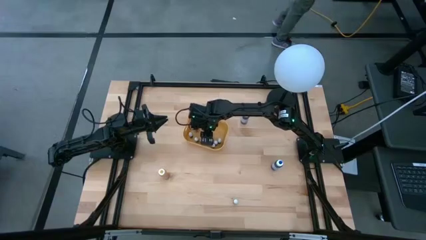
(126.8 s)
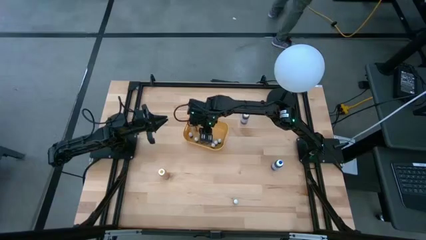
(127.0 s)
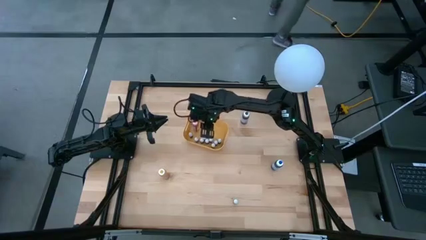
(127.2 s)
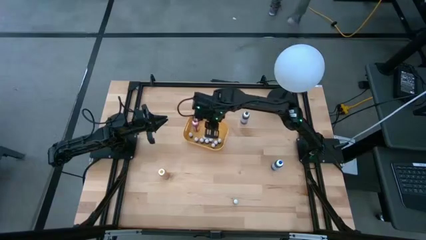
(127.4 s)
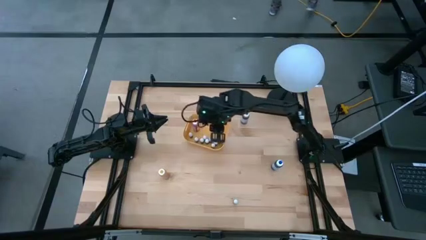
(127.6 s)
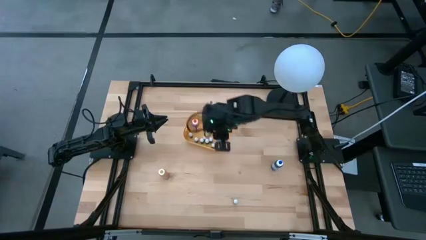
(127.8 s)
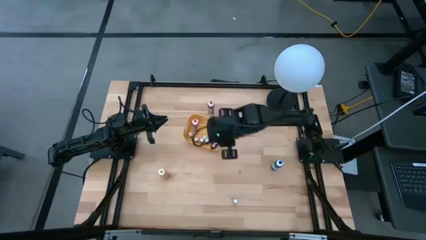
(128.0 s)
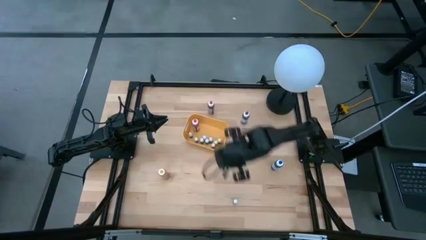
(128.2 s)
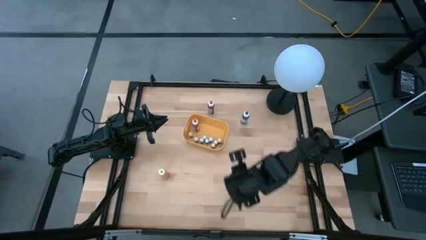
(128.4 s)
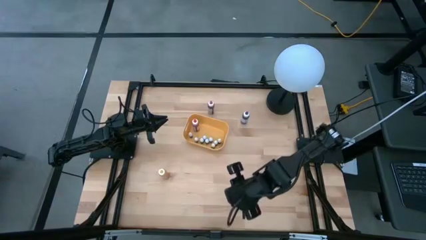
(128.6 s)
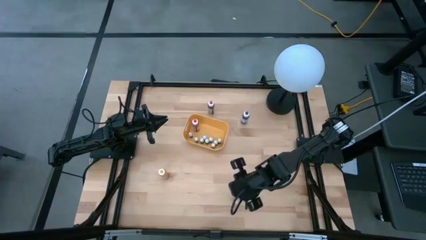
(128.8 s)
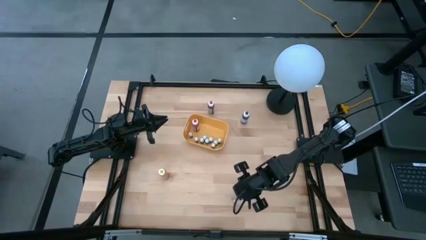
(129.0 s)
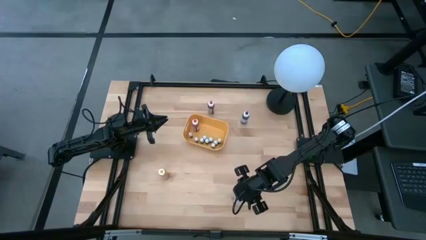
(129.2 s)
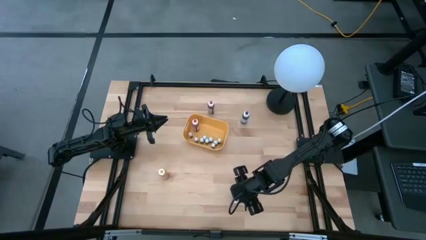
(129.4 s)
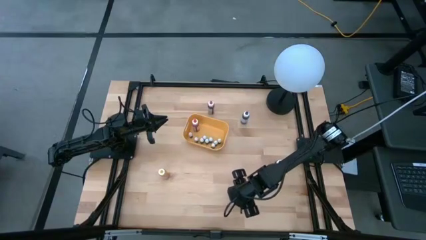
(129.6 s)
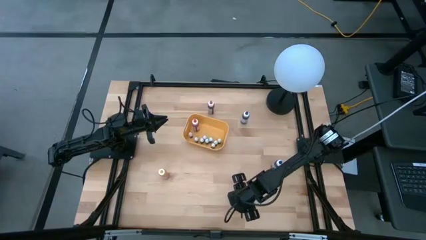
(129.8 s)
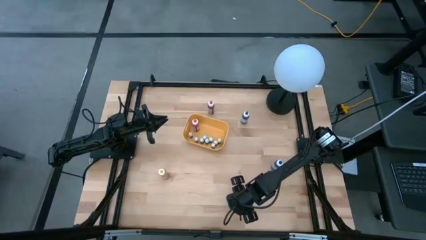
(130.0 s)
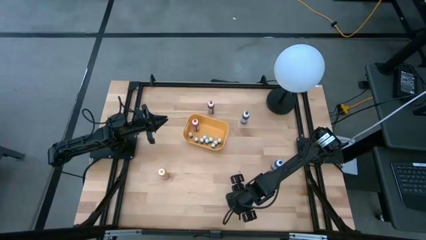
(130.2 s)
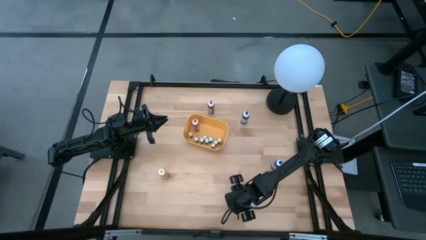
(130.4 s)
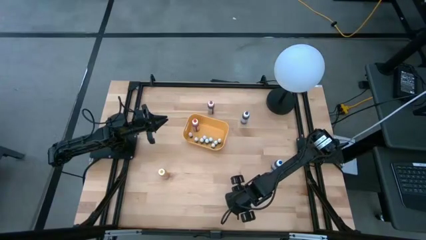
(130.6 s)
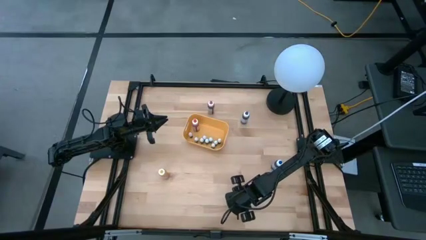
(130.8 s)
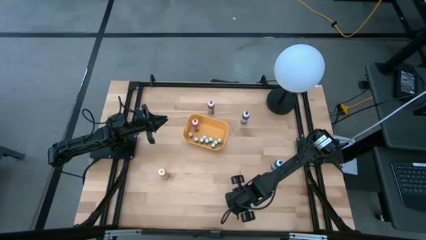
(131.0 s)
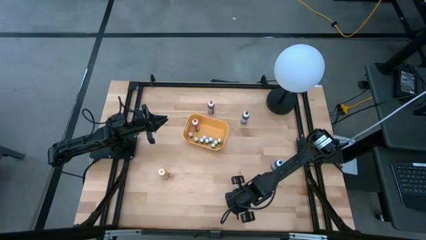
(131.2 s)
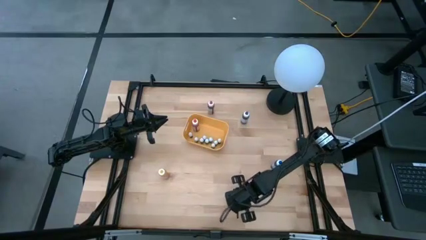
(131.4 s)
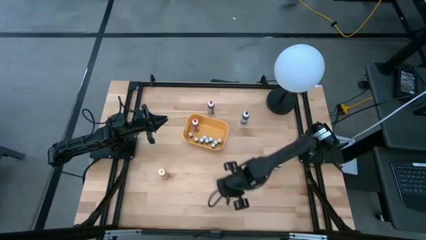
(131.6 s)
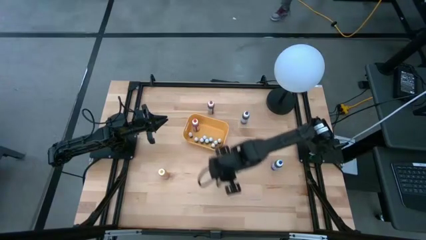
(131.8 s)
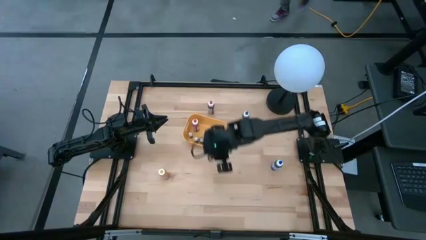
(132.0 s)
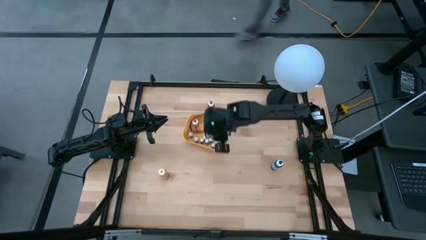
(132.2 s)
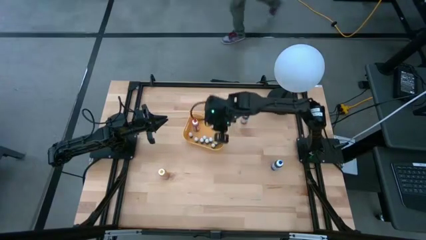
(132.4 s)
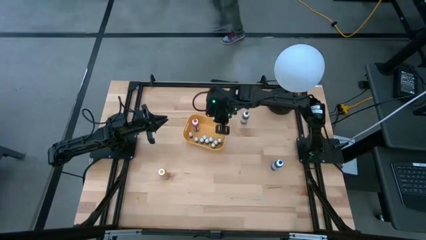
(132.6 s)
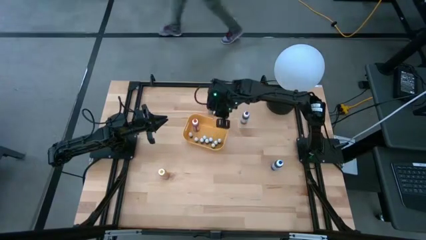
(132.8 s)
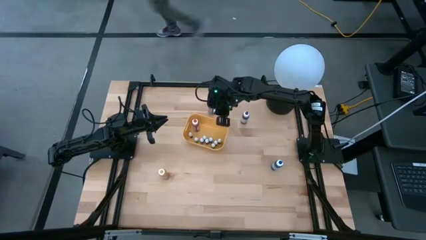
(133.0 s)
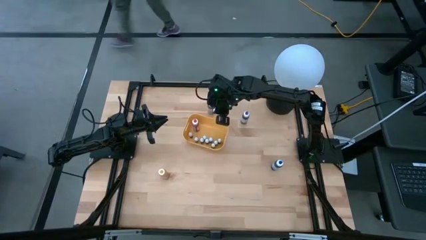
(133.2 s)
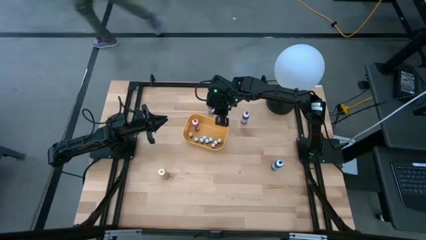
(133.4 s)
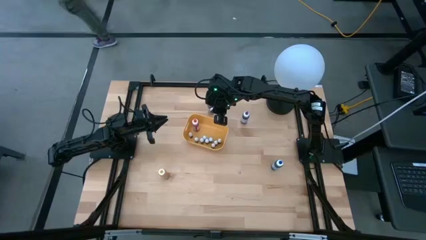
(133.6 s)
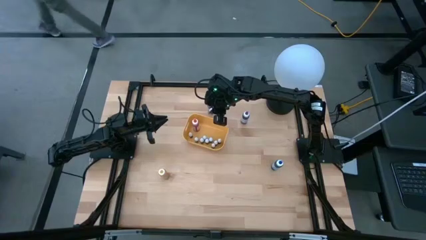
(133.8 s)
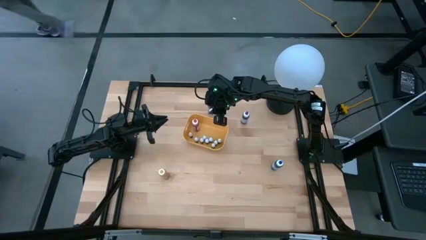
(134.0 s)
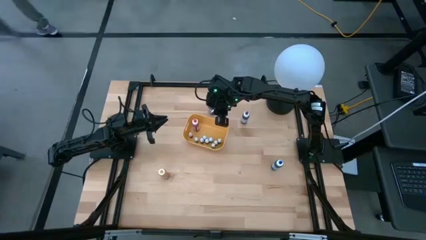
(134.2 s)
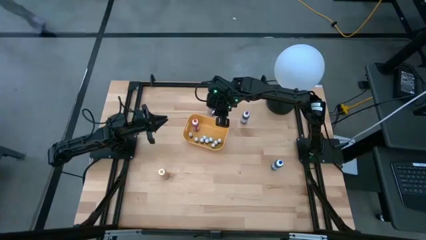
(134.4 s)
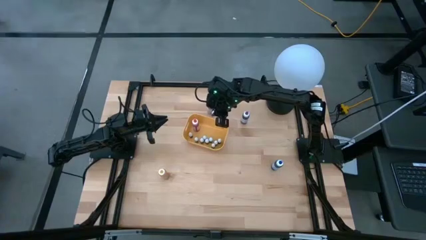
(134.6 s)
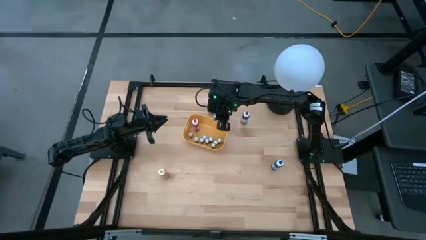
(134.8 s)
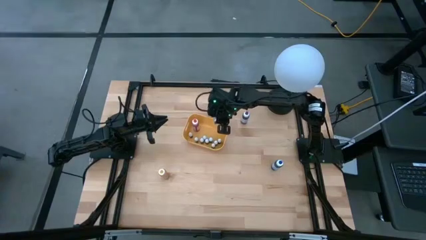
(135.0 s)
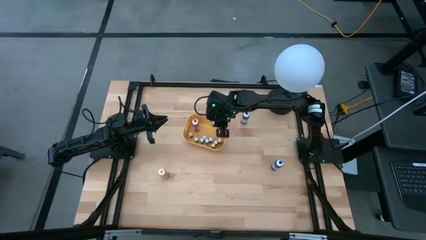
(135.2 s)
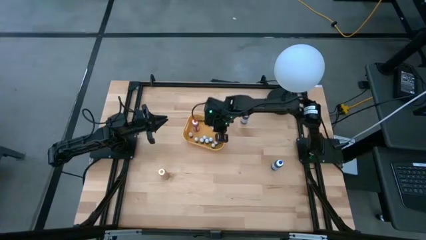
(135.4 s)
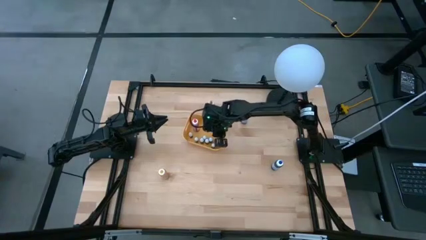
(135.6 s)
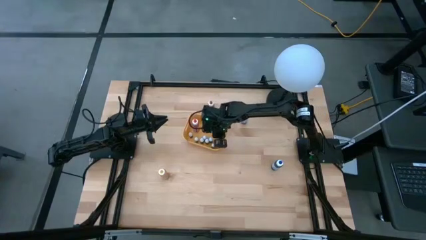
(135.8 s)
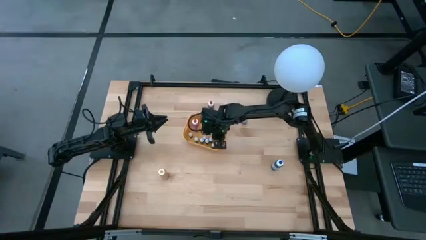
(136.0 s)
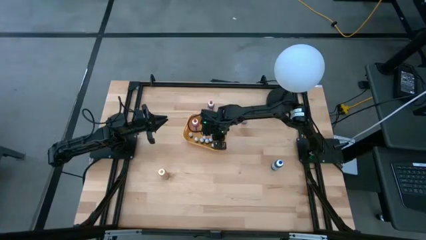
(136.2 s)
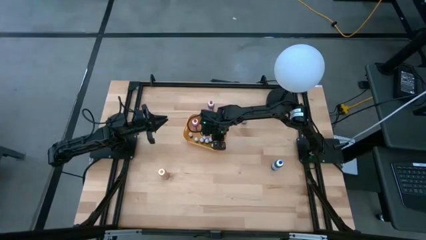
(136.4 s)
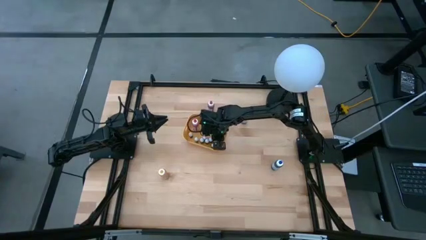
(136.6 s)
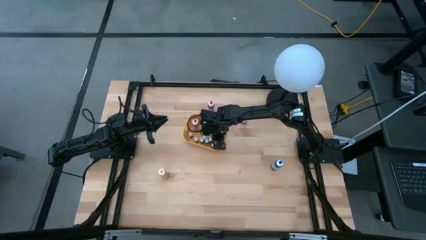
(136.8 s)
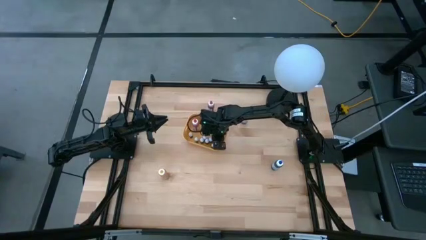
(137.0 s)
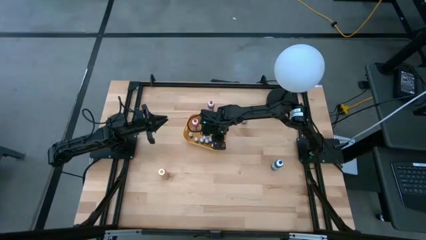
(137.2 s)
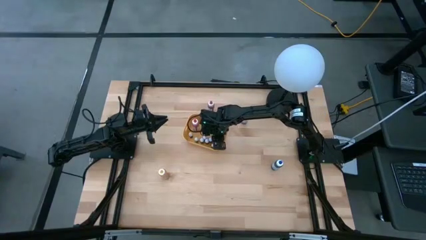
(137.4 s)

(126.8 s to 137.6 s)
Task: Pick & Place food coloring
Put the small pink food coloring bottle into the yellow bin

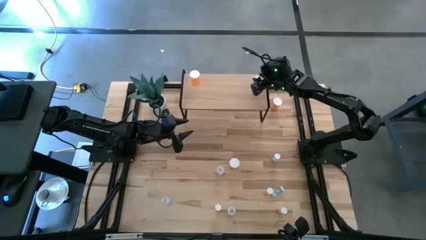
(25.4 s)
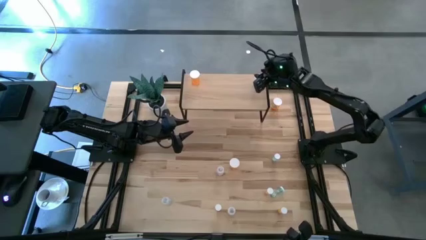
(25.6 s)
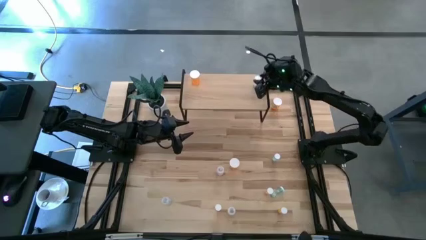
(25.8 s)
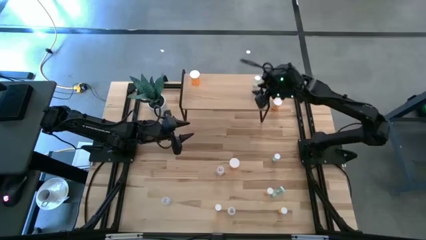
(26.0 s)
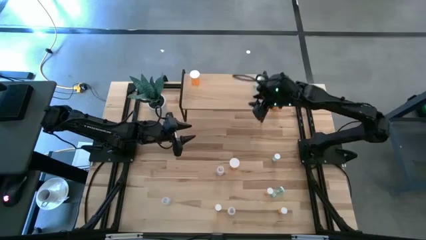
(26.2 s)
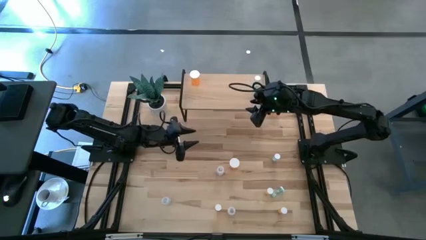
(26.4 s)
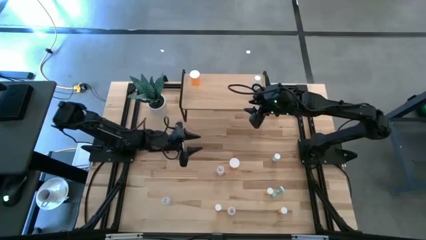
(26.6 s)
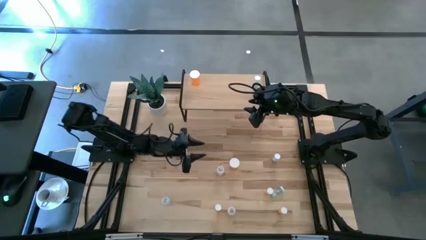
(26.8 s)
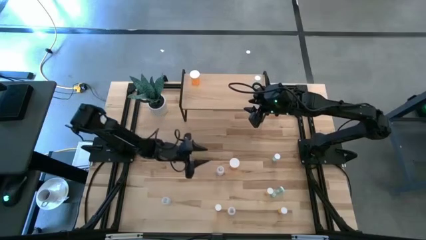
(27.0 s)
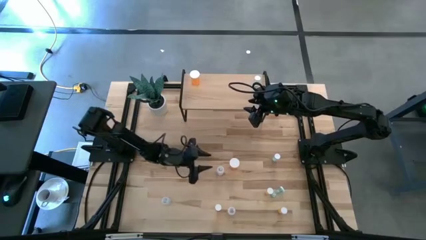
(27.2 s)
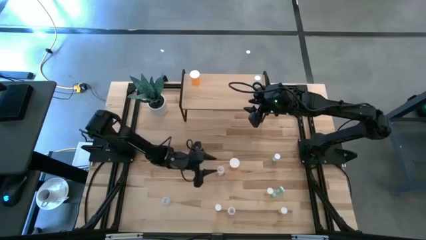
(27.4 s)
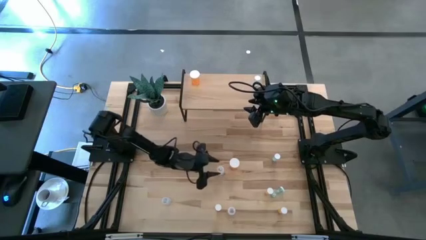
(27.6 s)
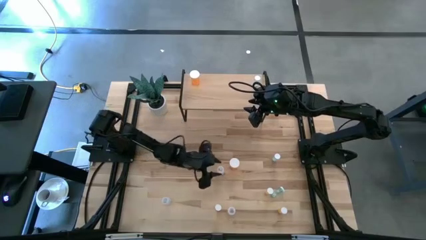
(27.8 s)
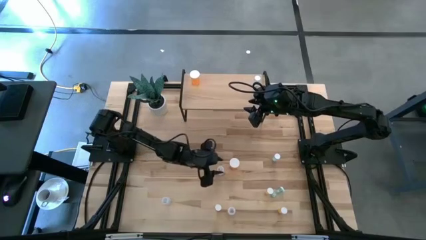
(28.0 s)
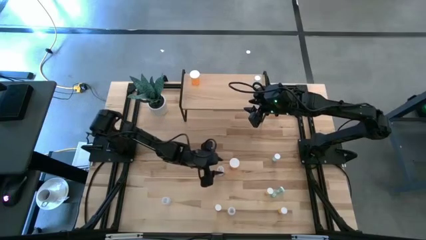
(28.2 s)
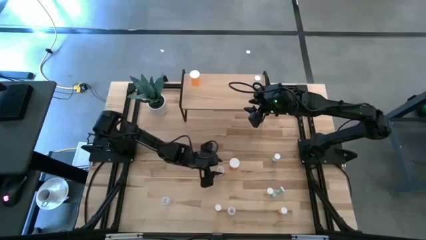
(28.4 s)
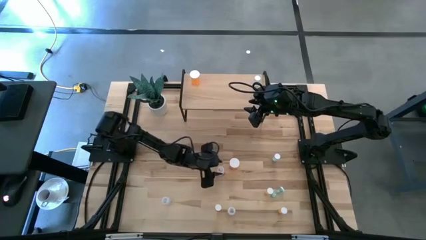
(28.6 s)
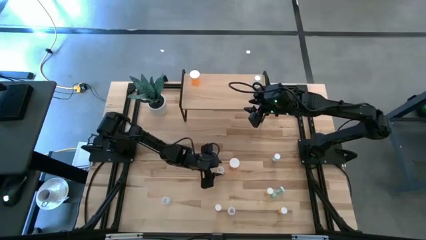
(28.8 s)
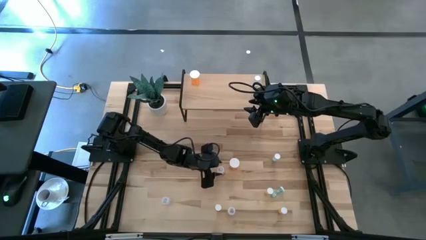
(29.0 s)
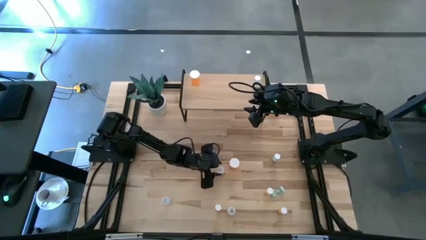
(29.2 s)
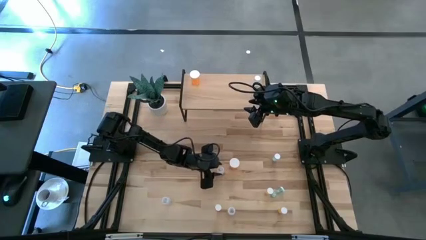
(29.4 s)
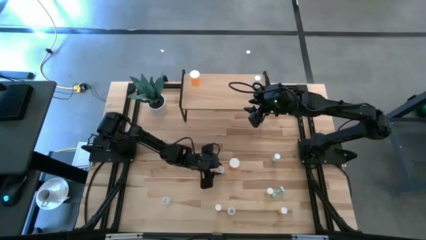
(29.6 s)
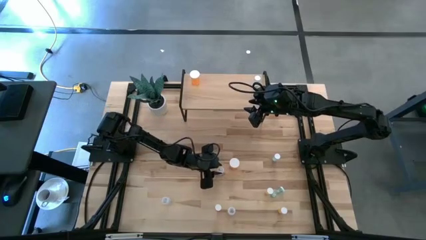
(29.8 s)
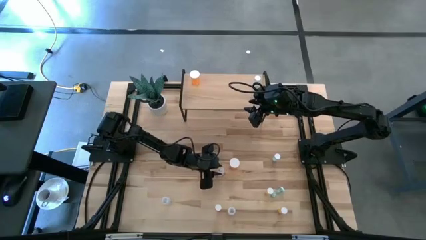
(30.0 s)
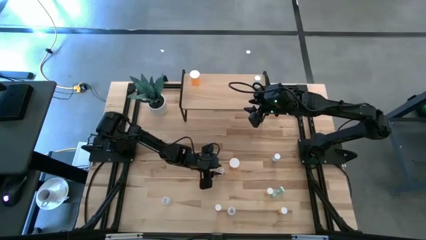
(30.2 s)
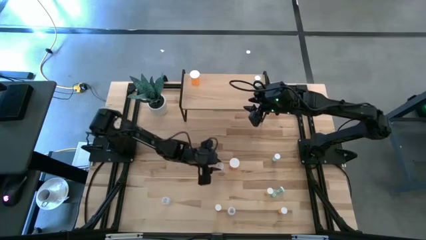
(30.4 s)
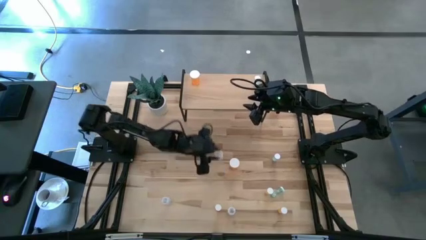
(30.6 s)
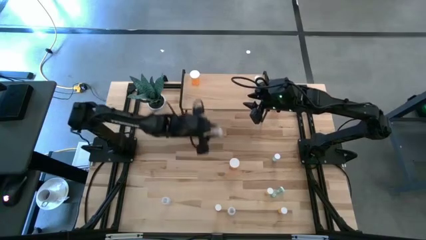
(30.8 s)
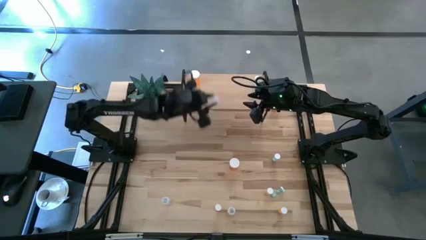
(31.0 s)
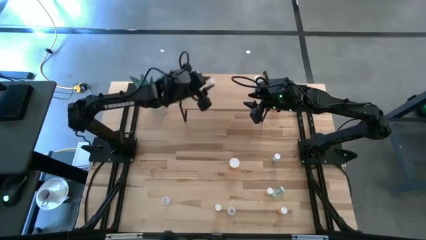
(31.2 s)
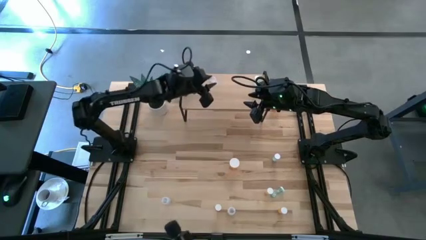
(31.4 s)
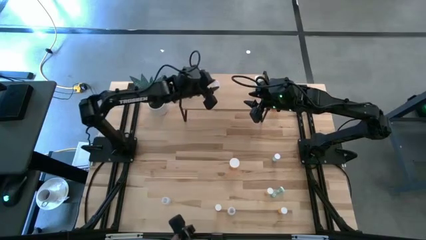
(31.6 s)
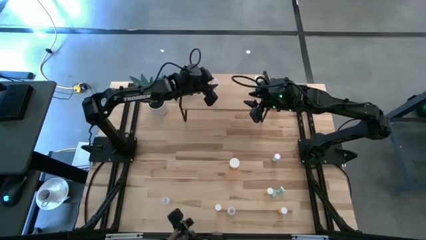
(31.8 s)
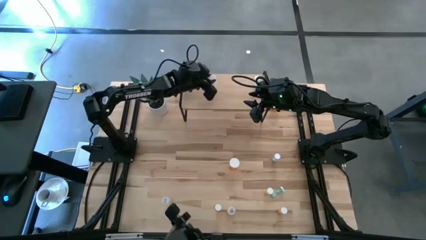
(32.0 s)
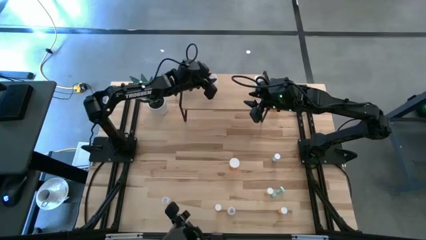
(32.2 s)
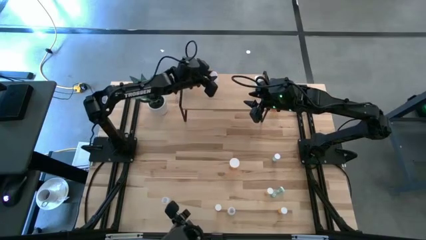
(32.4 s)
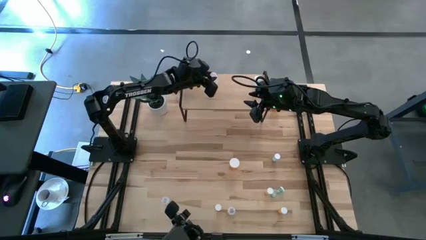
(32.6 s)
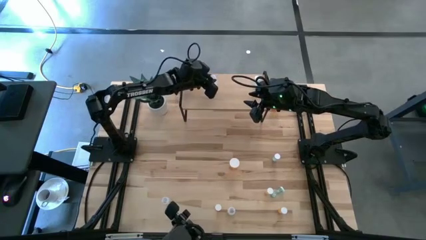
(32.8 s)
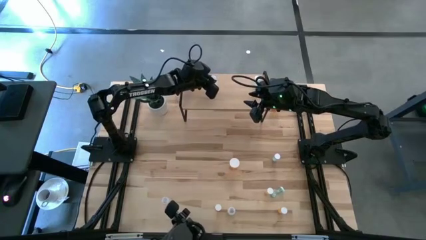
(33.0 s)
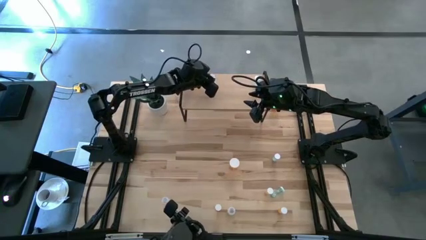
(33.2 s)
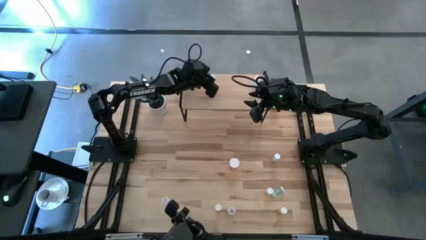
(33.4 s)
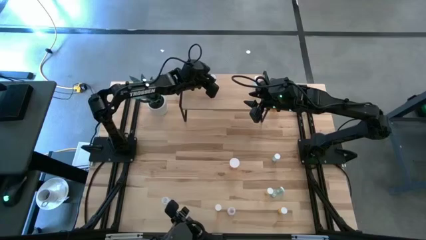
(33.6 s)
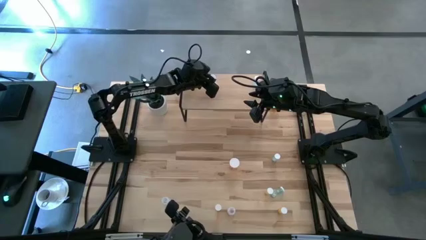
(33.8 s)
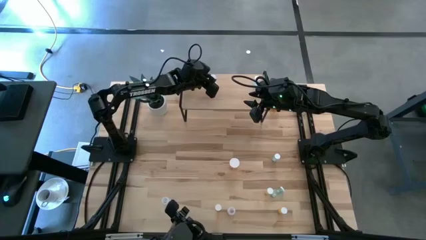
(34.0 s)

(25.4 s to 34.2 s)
Task: Pick and place medicine bottles onto shelf by color
Put the top transparent pill bottle on the shelf
